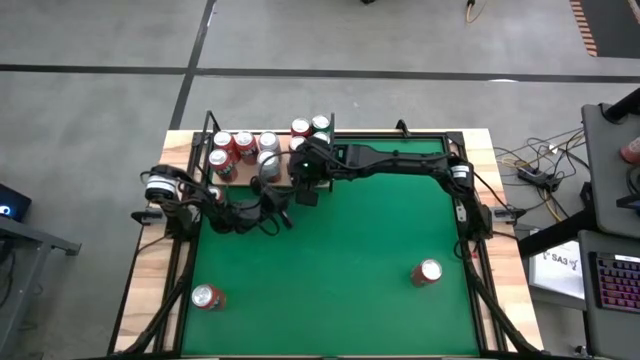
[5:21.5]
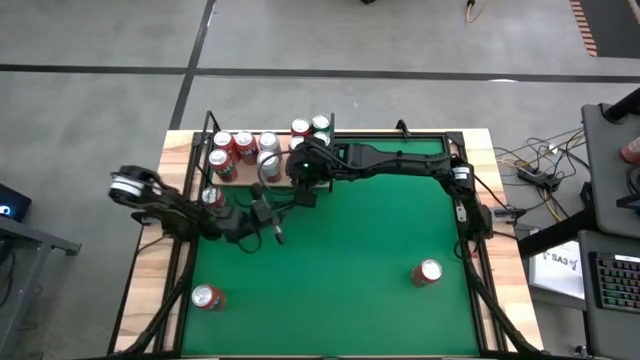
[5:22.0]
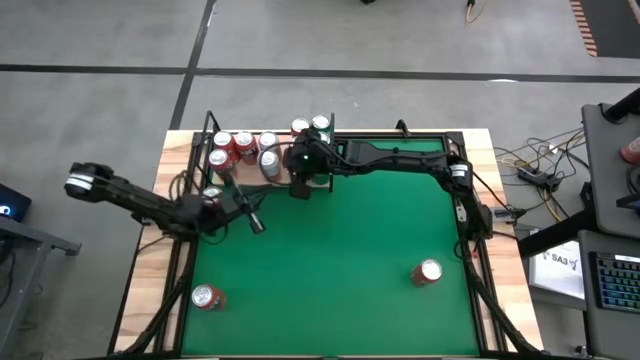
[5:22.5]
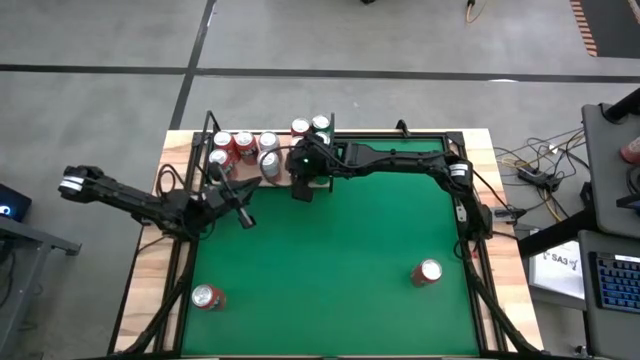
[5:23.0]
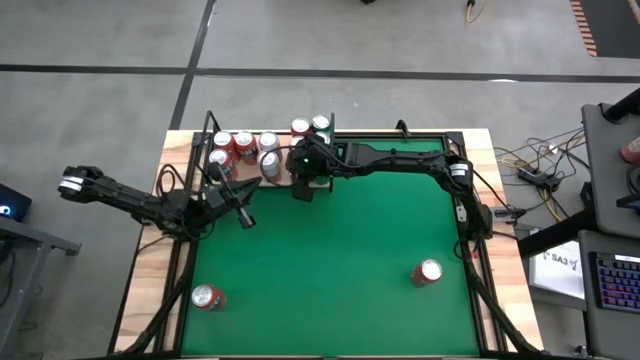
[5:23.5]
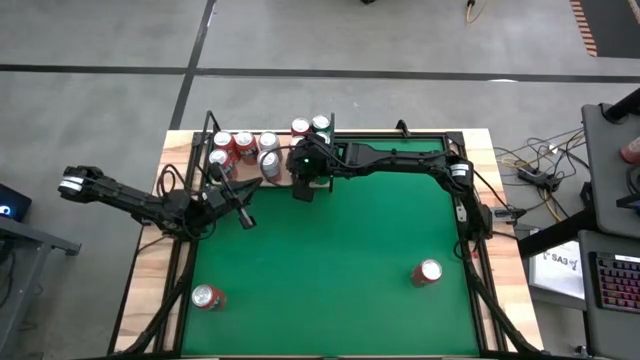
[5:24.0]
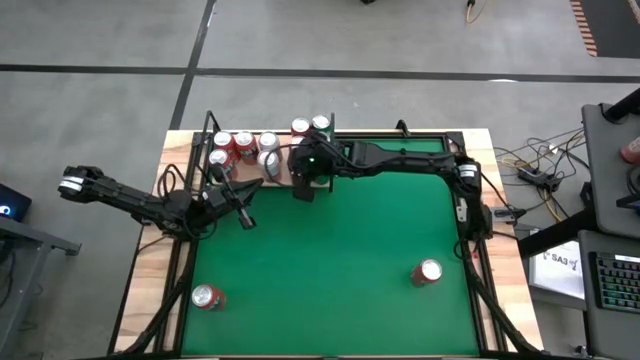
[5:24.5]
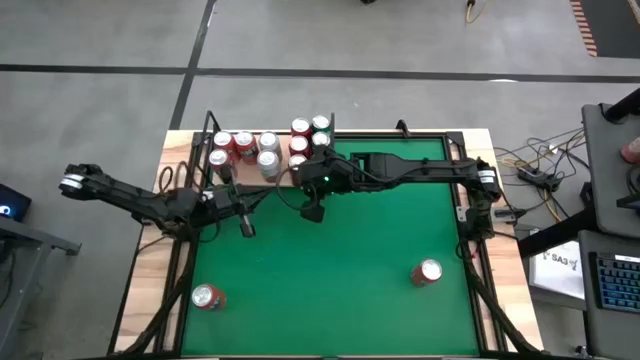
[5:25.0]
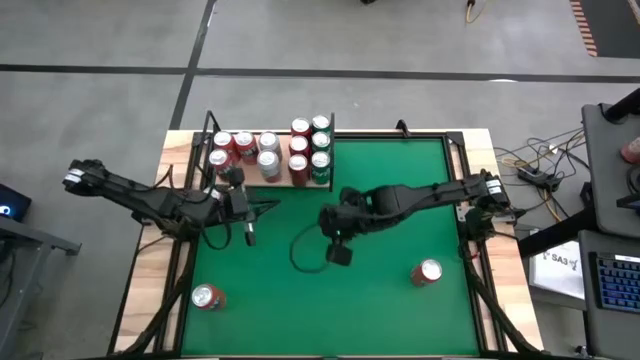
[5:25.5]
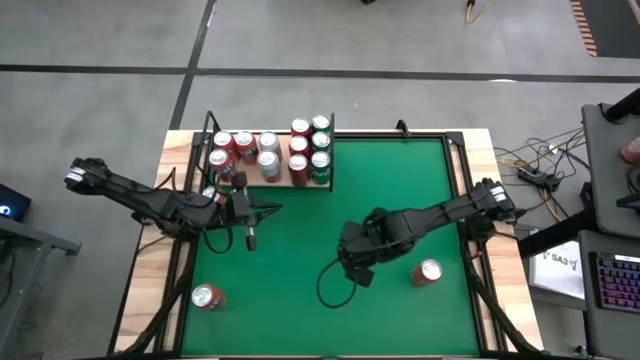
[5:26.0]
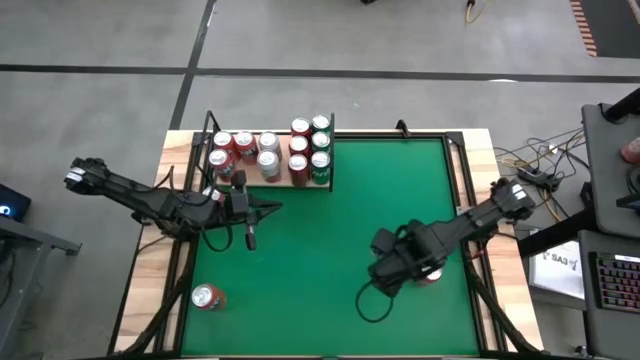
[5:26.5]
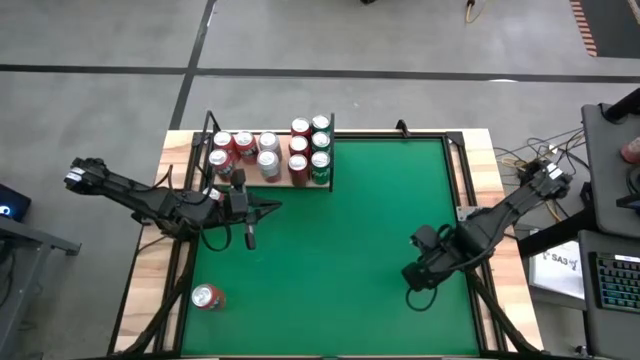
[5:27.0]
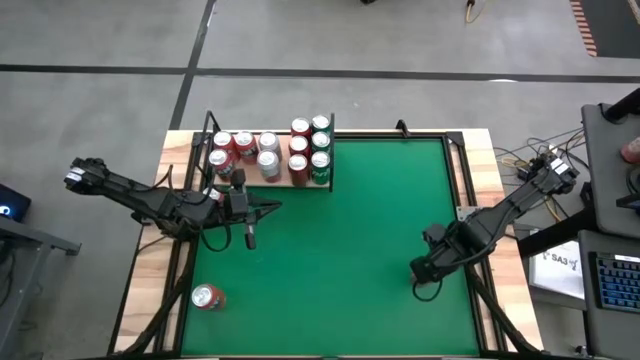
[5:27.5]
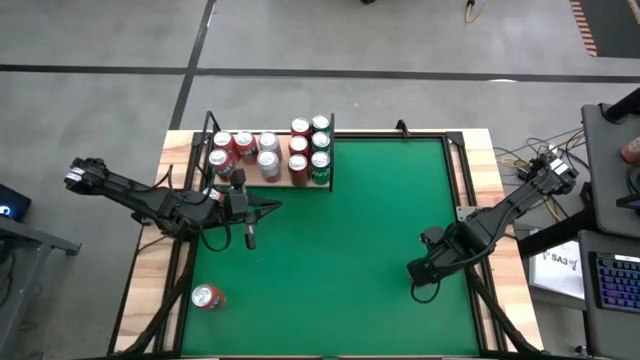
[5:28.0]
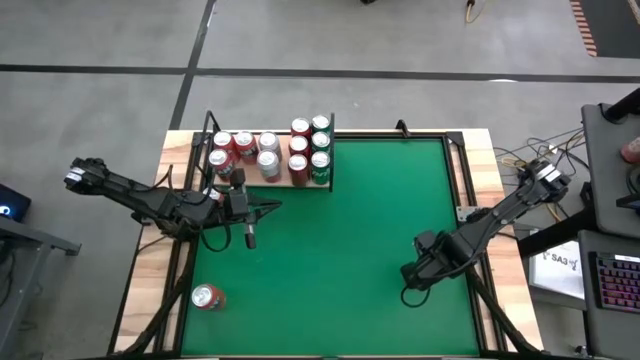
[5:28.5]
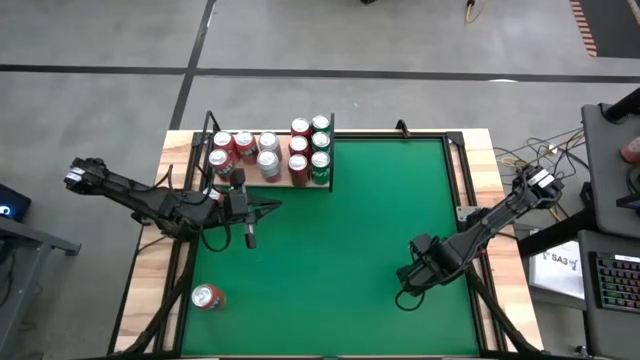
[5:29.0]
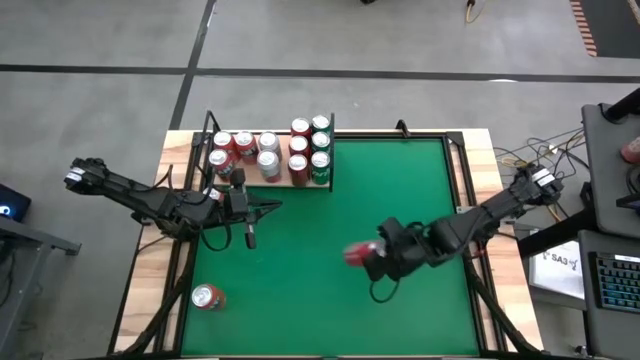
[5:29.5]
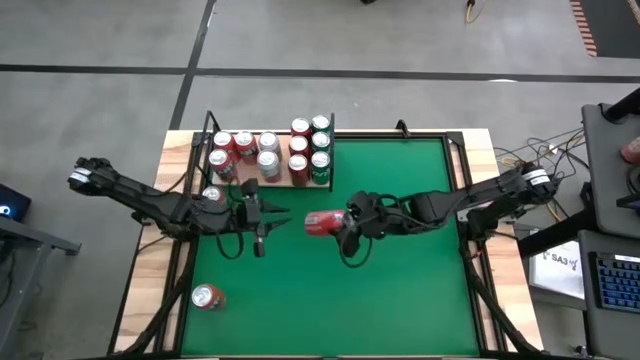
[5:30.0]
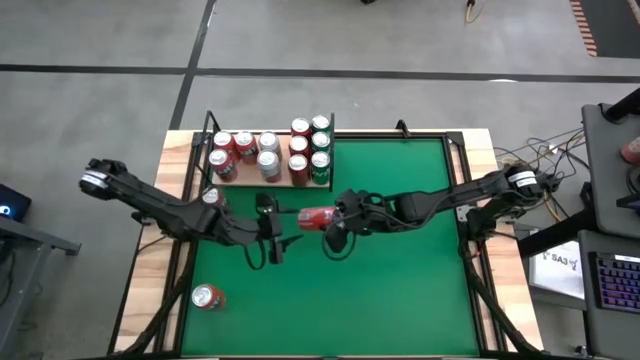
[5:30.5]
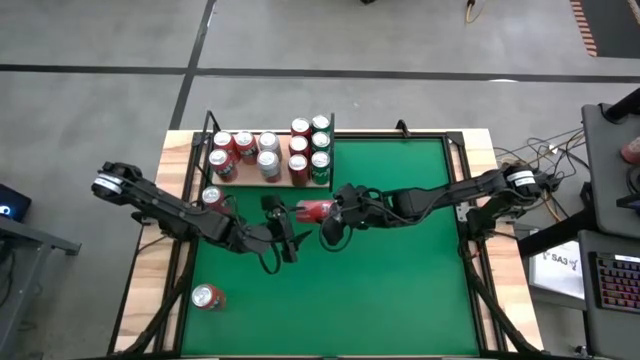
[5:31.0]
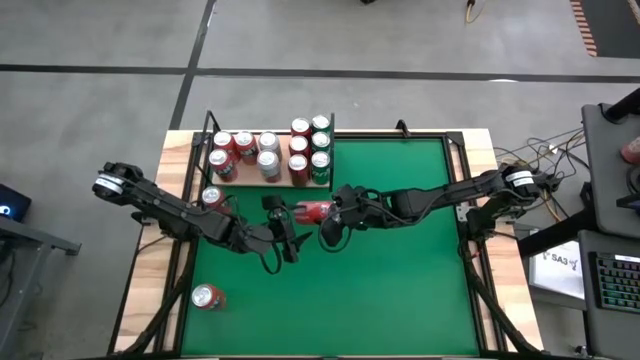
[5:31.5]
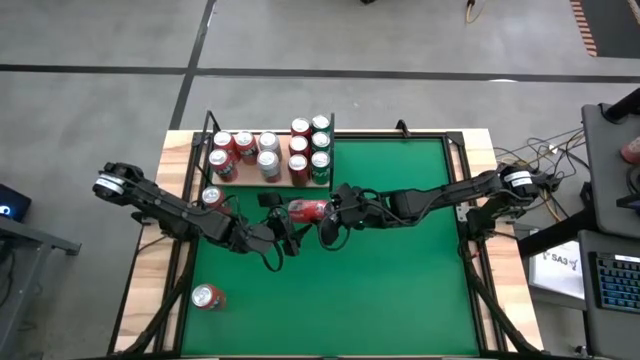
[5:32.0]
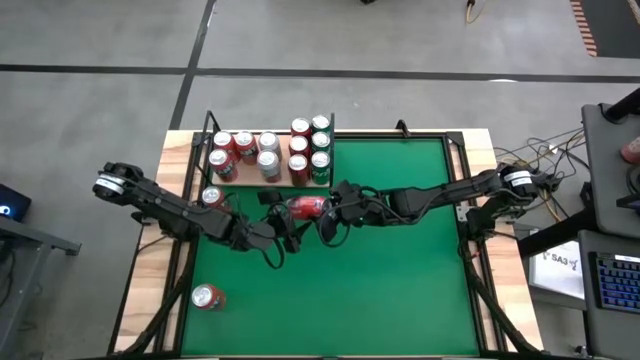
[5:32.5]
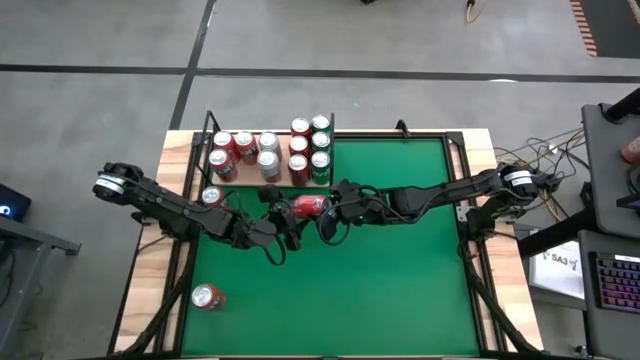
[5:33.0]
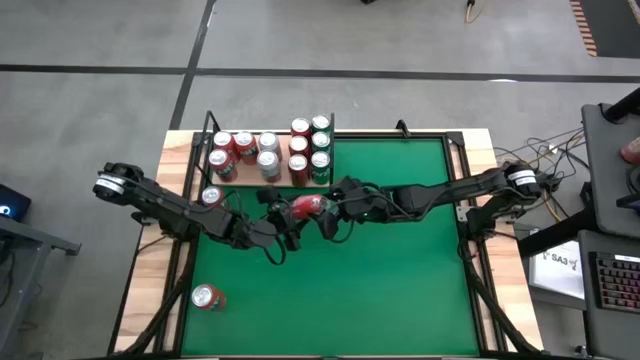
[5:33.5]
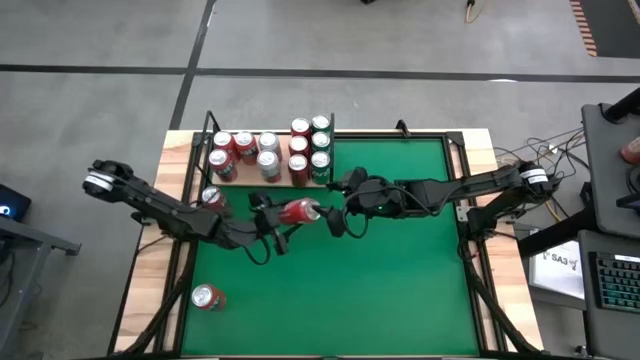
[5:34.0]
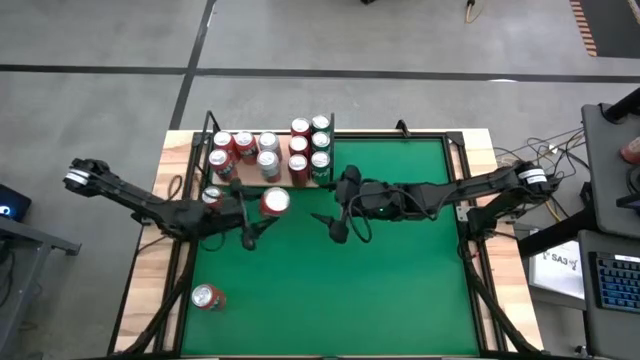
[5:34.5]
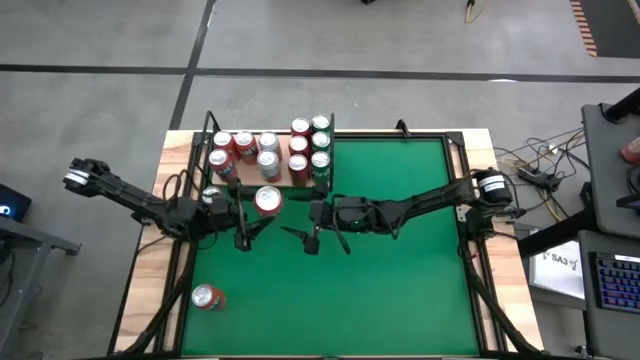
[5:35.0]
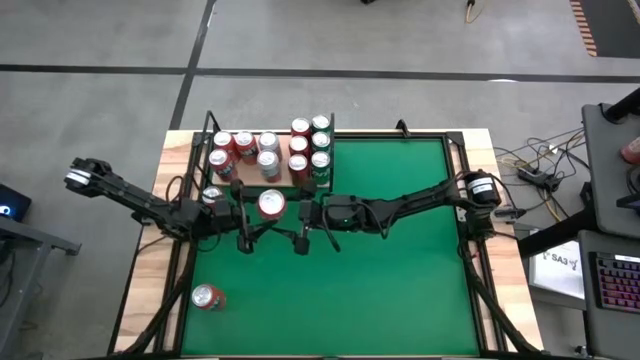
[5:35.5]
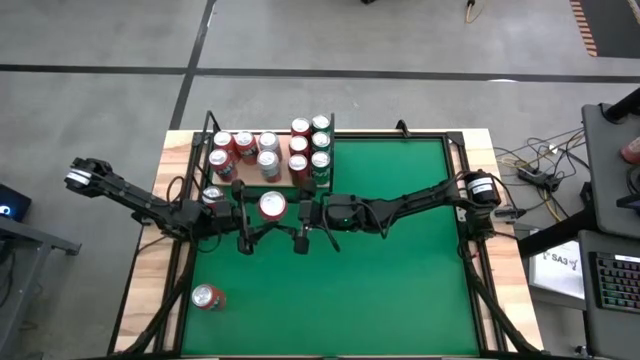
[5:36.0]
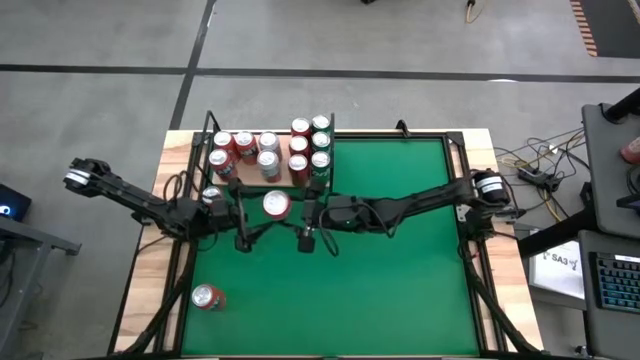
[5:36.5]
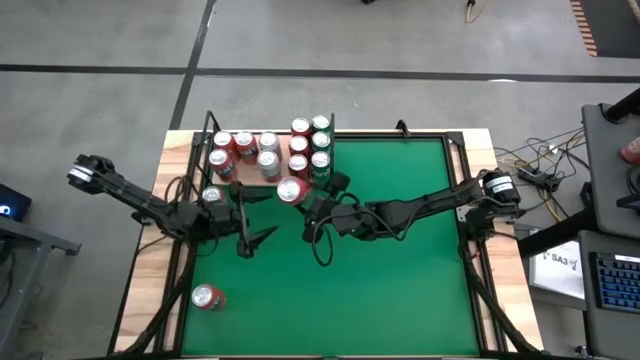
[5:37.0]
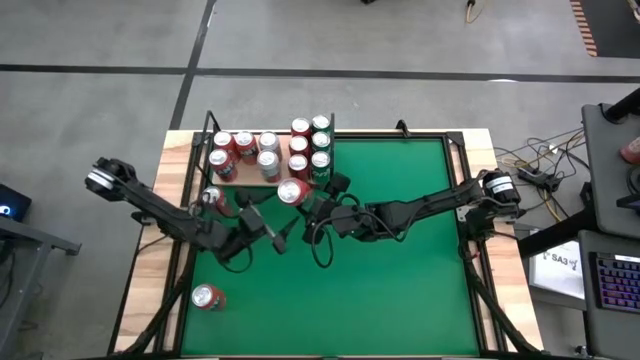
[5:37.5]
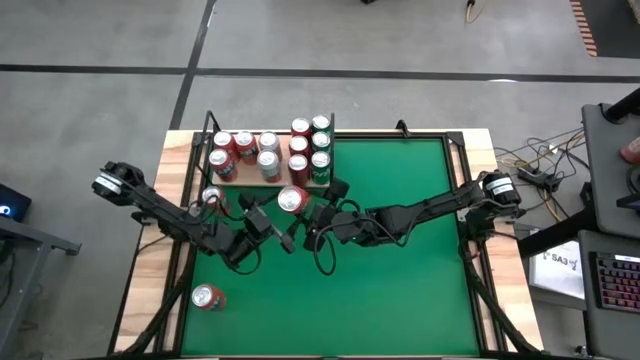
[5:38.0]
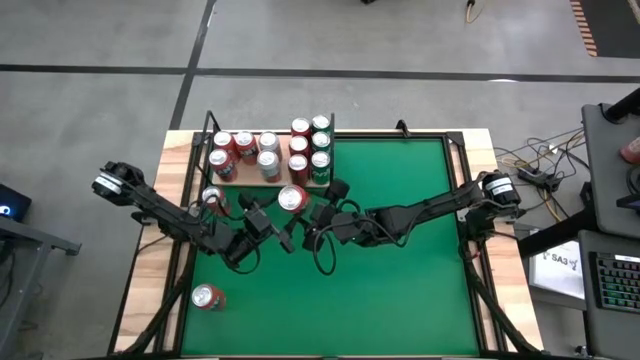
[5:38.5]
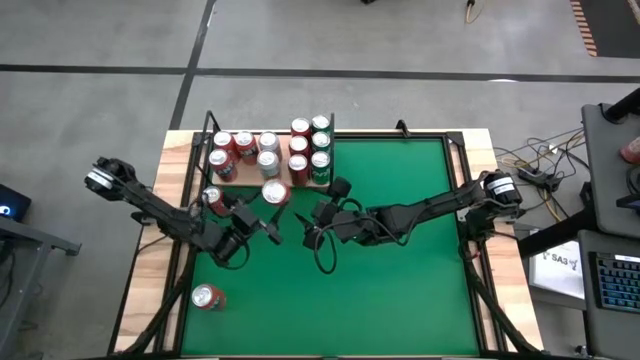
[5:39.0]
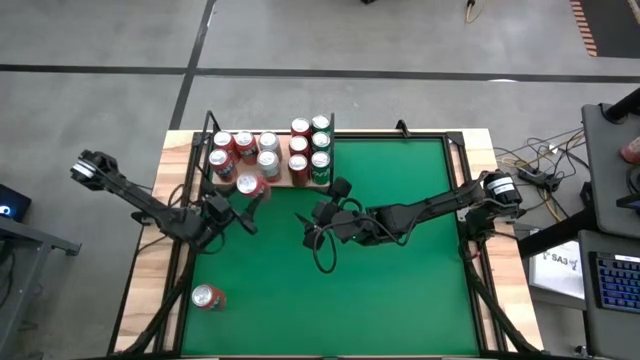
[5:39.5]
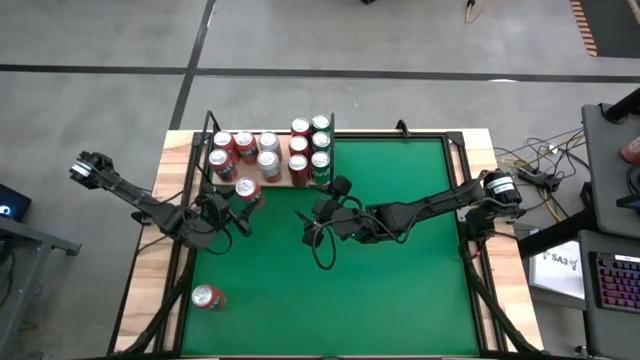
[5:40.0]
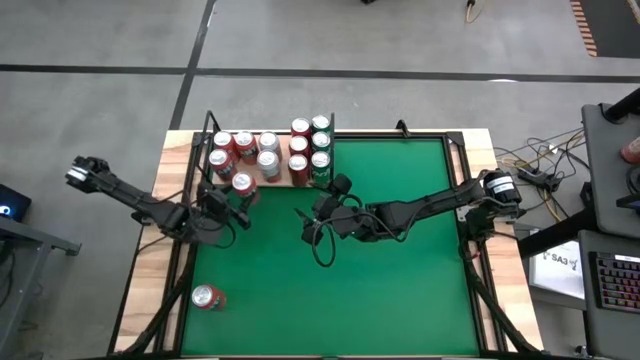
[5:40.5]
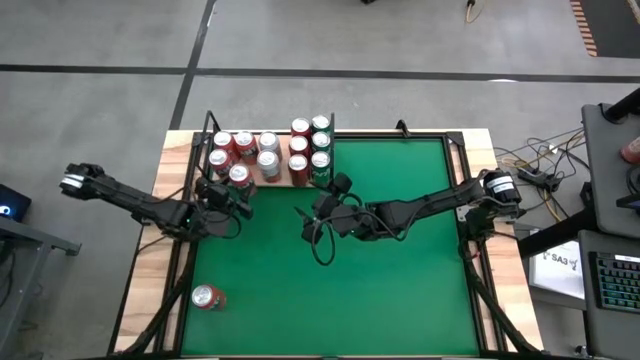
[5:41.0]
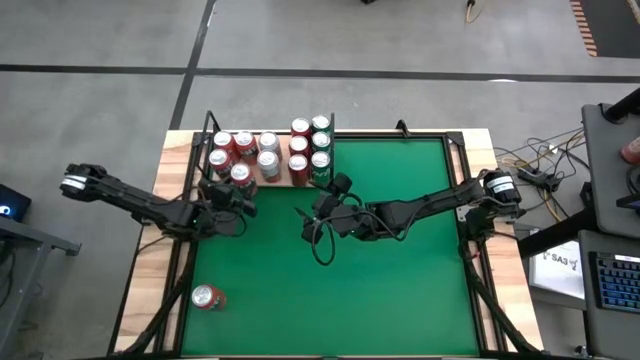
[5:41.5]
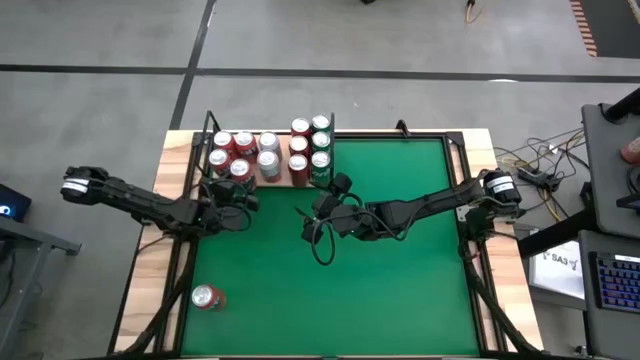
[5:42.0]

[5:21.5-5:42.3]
Task: Place canned beverage on shelf
Put the red soda can on the shelf aligned with the other red soda can
